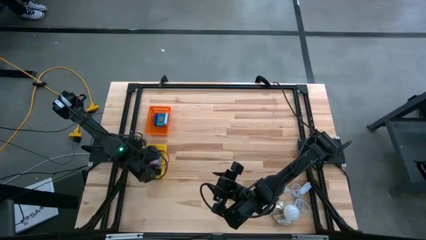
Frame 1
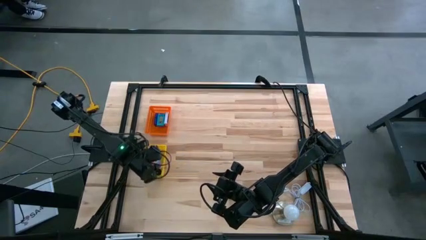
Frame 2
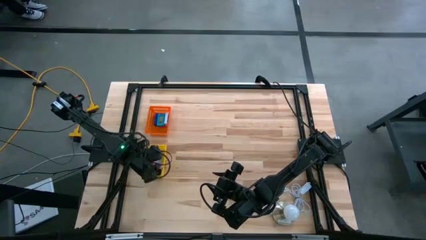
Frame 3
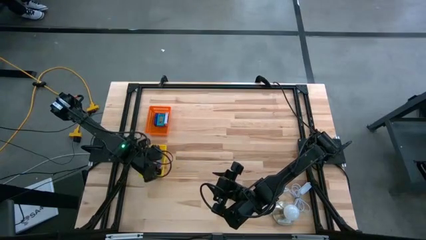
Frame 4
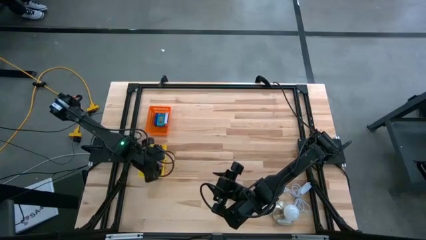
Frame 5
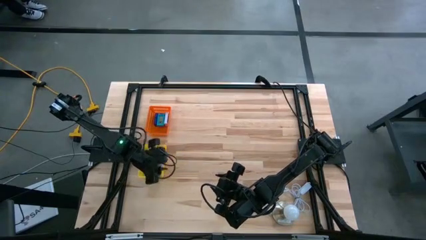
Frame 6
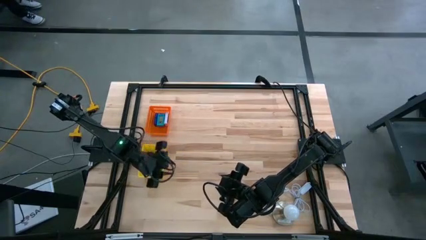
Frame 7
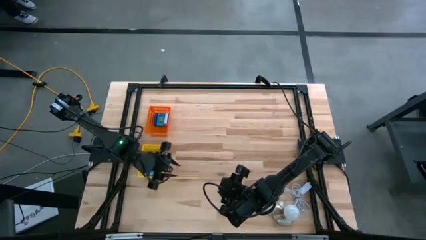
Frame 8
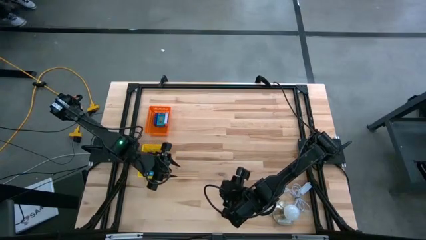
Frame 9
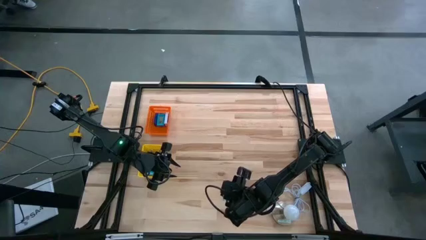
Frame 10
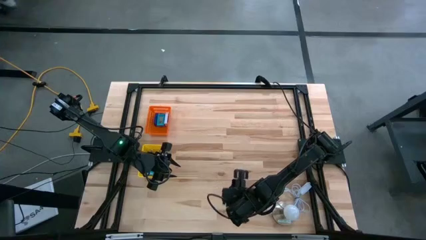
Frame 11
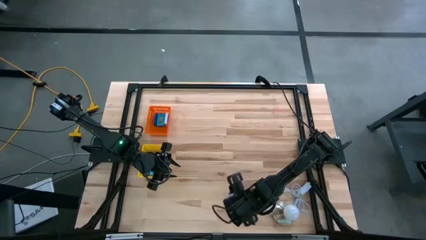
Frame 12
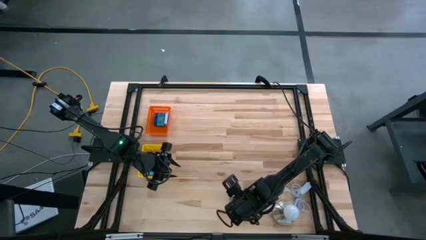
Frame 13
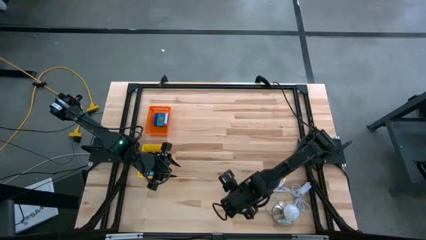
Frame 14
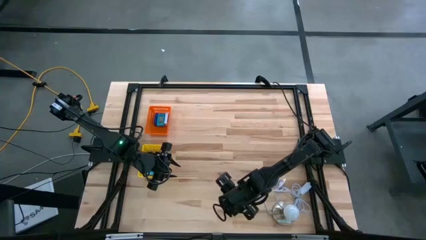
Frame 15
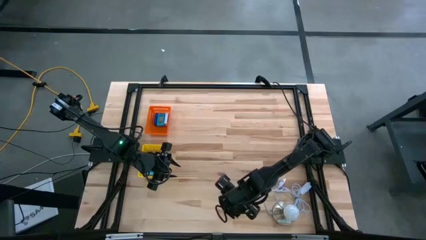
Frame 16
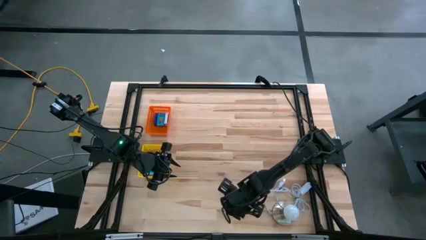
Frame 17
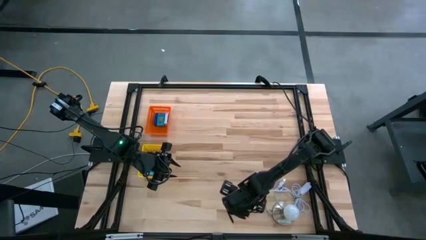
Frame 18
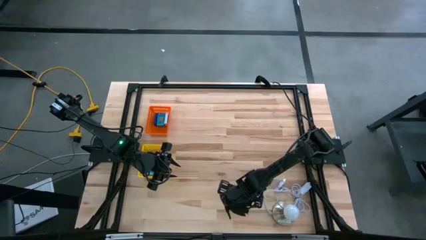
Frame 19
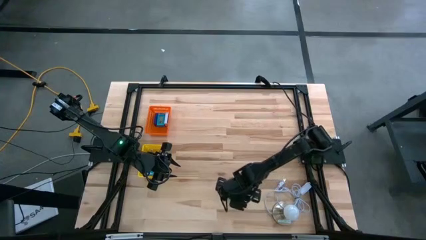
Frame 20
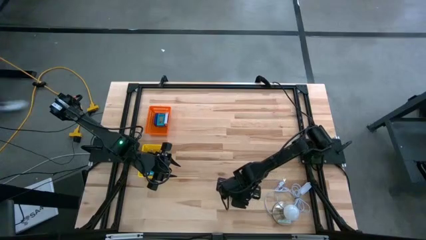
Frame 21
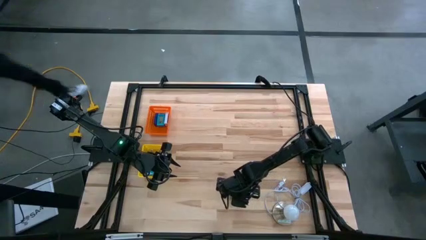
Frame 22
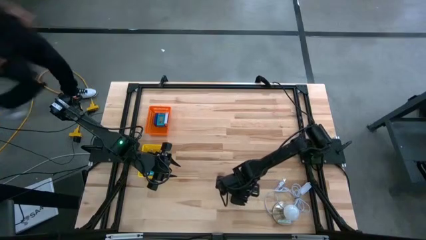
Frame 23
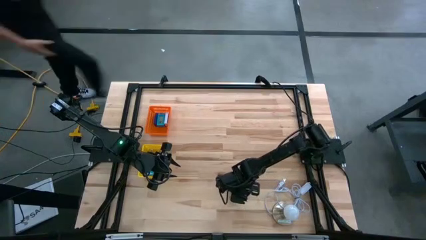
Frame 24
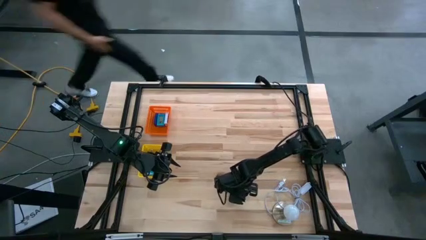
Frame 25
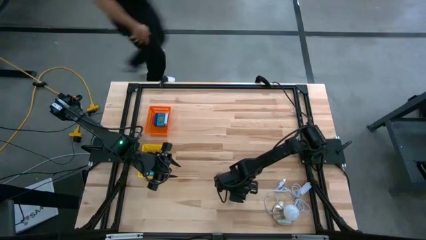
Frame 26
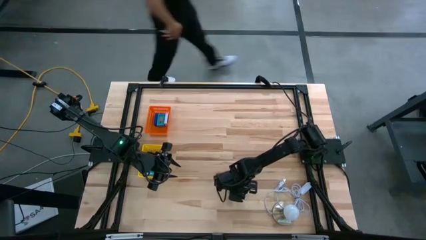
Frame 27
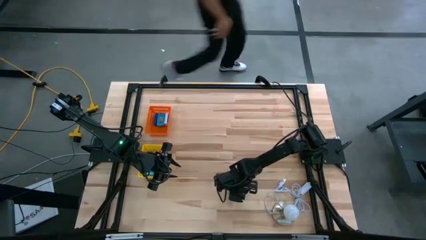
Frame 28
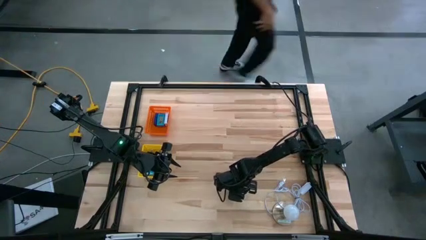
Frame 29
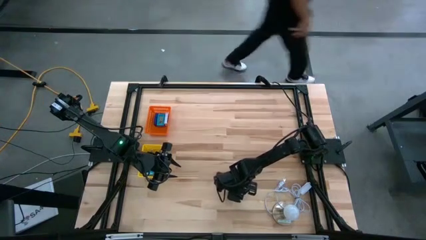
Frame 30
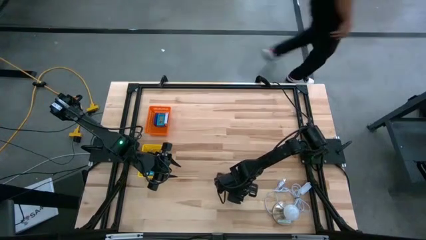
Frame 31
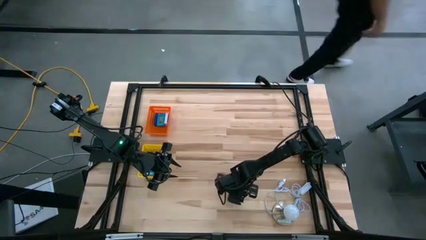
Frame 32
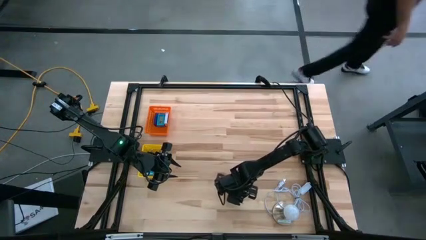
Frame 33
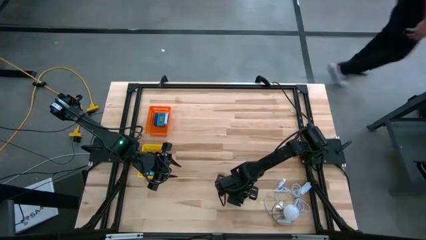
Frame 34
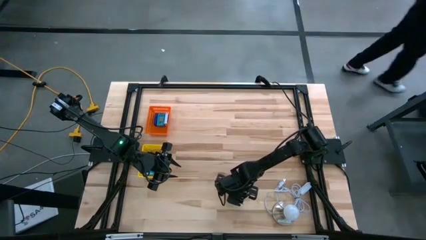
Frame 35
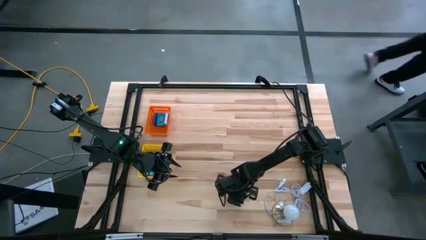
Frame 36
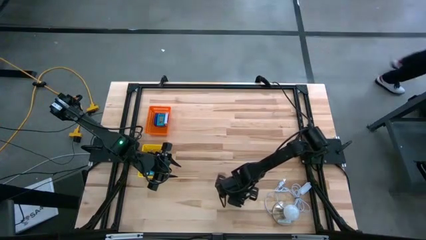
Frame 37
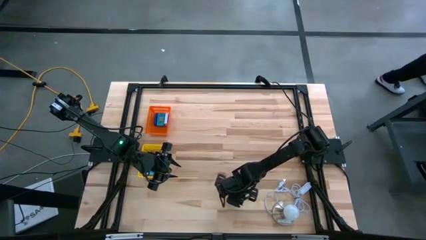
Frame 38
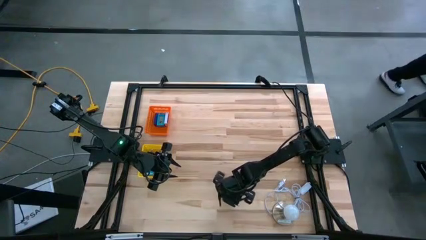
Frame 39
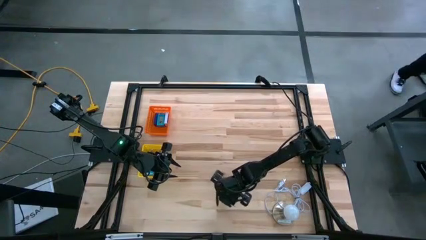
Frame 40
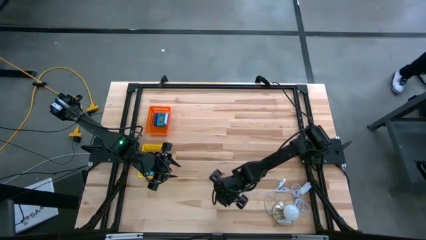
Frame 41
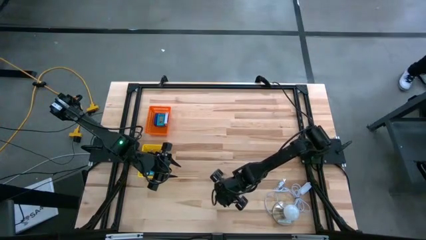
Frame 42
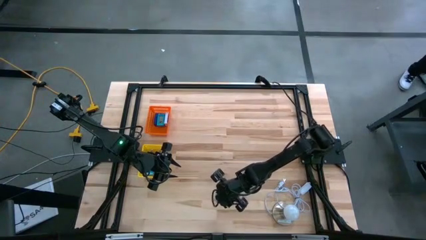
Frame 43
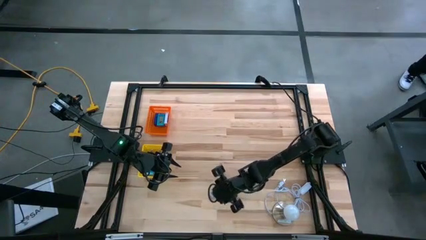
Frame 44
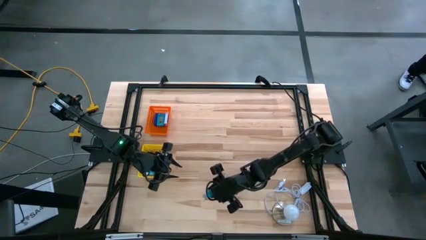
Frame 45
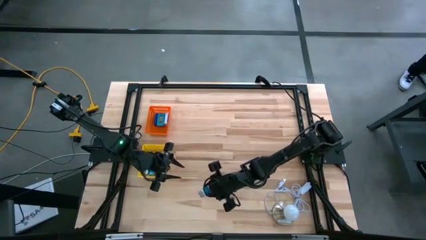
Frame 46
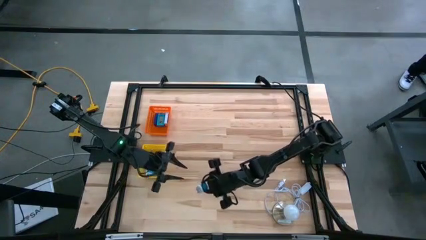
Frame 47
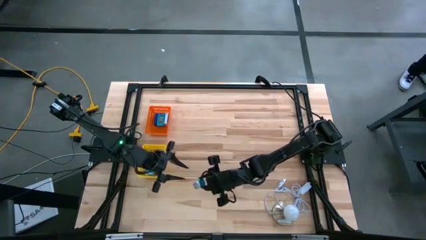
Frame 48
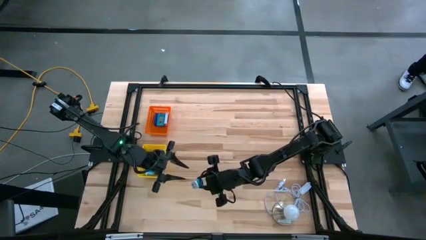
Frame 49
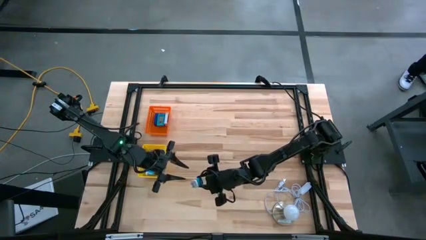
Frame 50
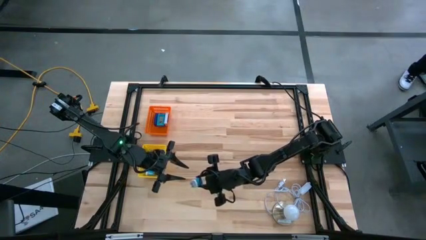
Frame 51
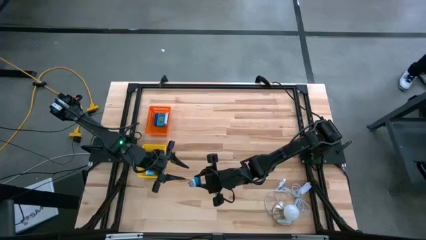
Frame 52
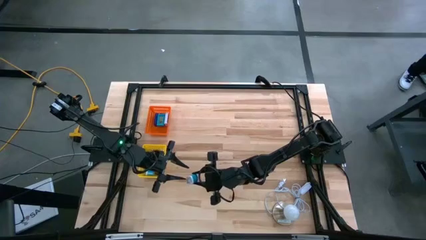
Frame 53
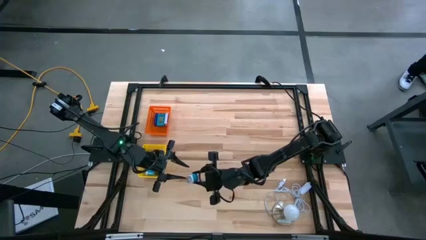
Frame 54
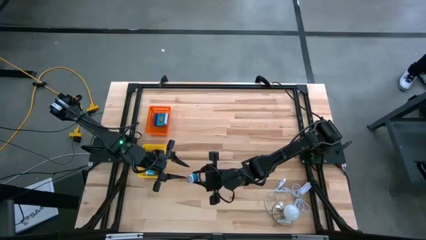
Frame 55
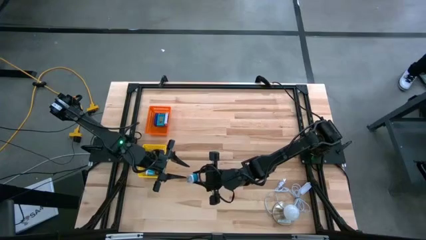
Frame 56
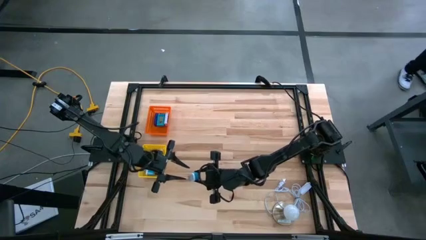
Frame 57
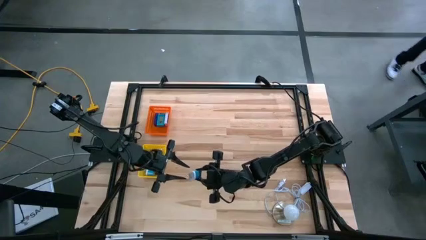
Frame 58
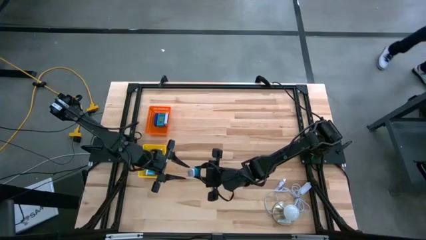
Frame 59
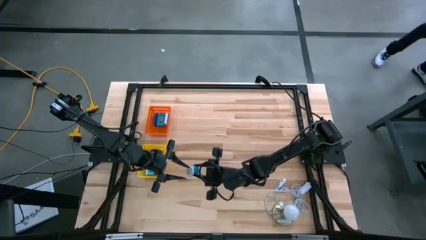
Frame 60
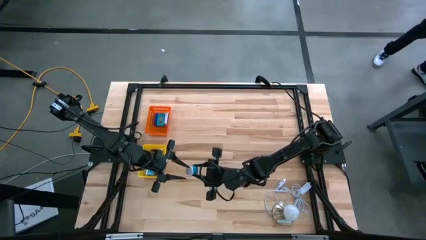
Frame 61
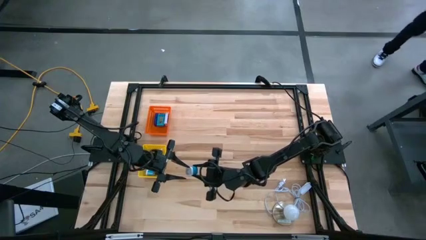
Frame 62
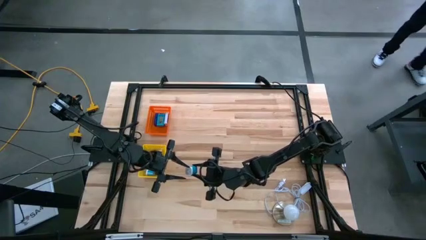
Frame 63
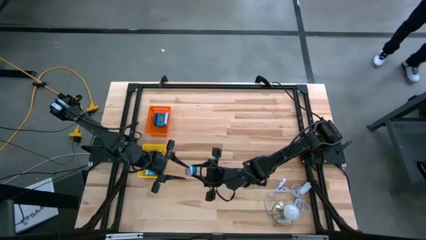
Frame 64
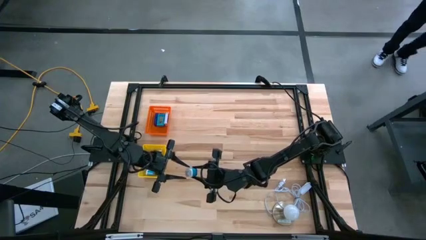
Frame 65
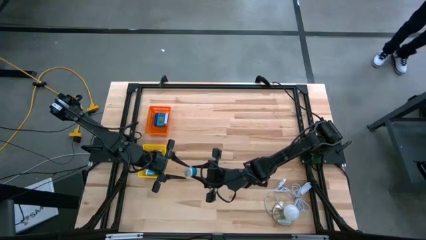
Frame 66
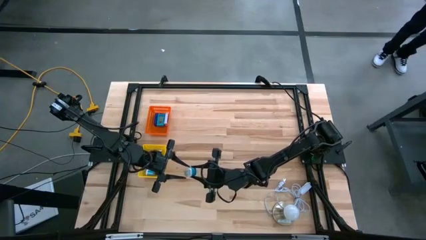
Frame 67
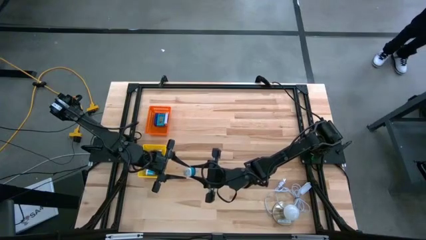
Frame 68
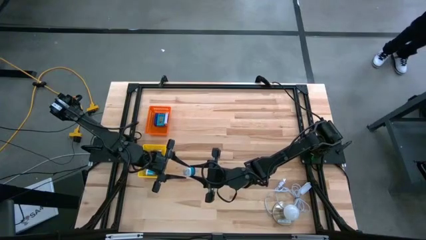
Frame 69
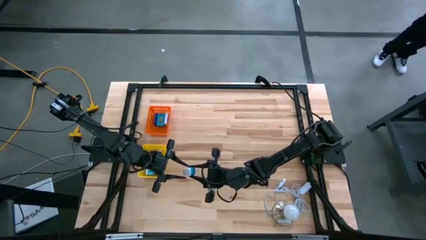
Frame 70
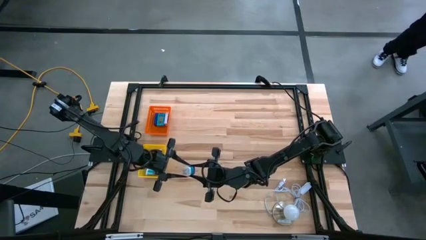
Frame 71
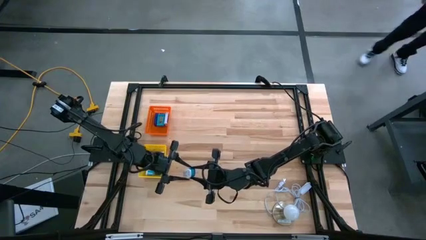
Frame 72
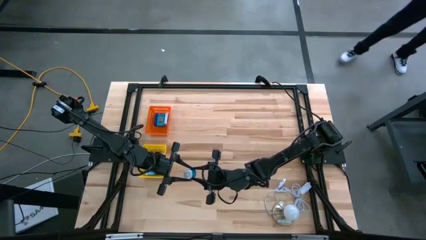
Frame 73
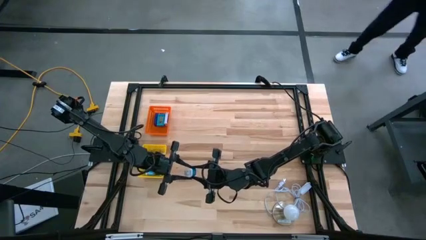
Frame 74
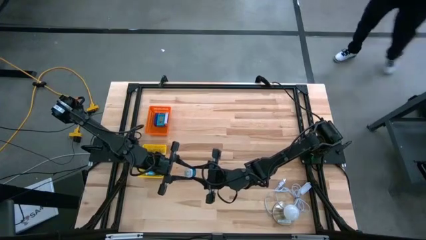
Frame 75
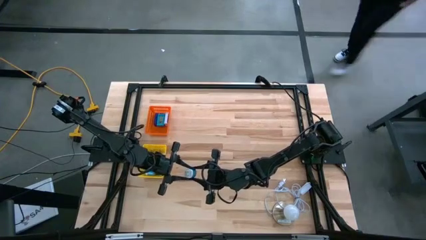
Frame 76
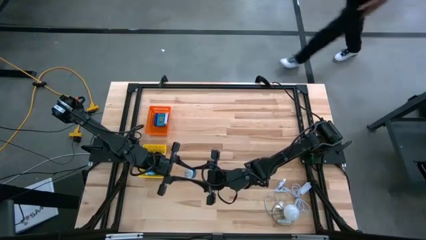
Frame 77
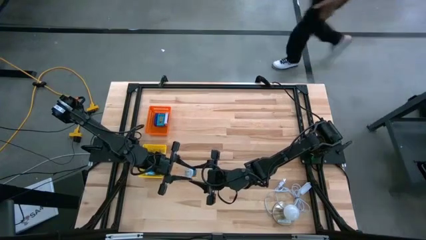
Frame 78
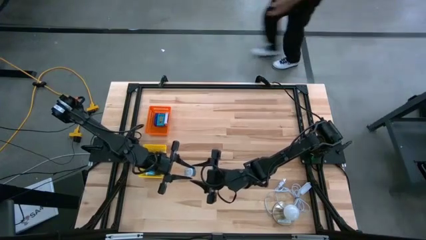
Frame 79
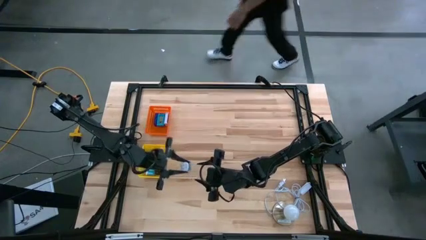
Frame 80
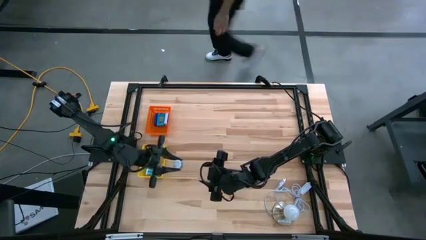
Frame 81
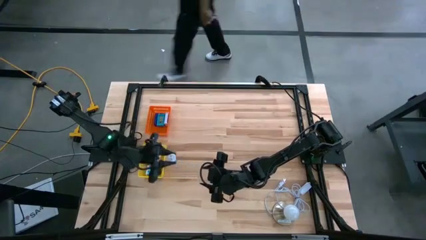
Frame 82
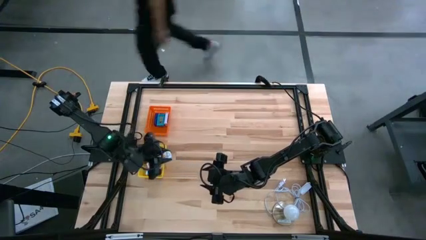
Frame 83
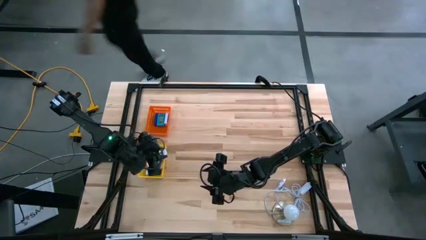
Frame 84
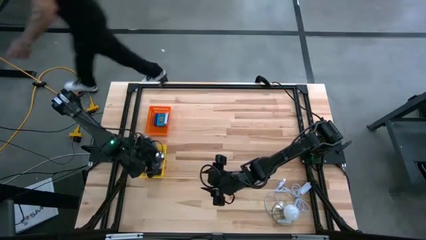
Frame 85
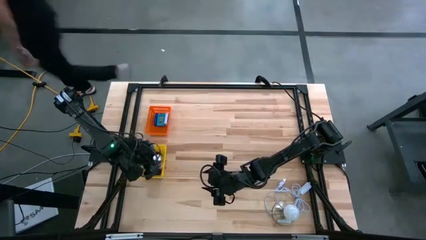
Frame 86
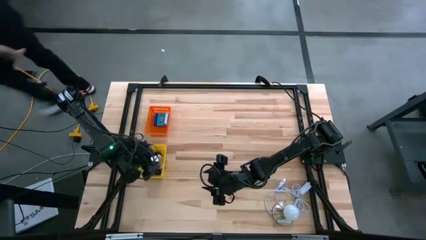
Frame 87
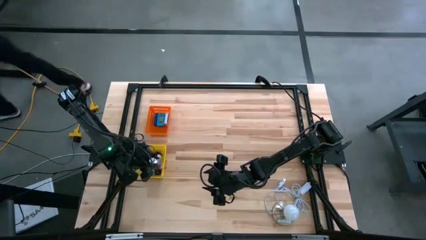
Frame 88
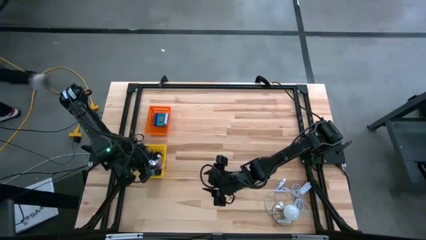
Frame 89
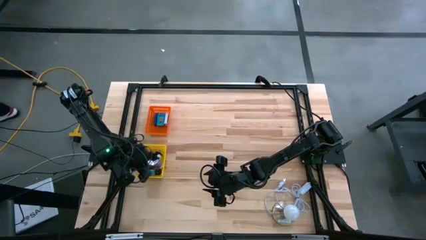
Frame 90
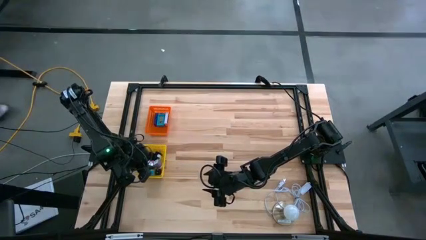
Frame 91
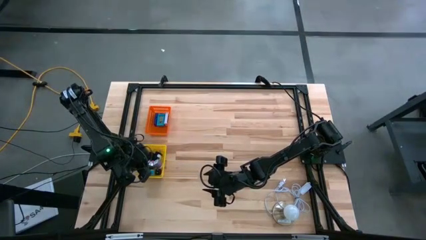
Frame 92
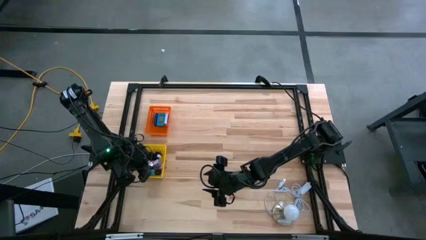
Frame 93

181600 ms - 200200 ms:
Task: Pick & Place Office items
Put the blue charger adapter into the yellow basket
